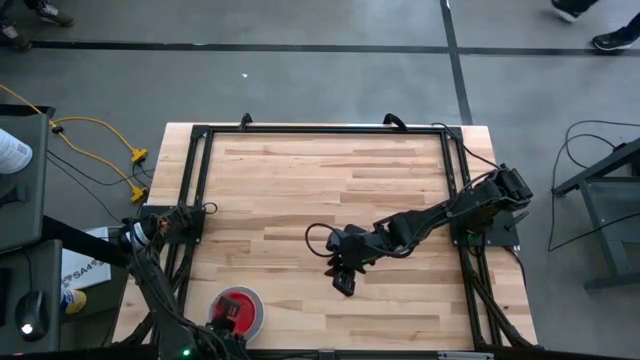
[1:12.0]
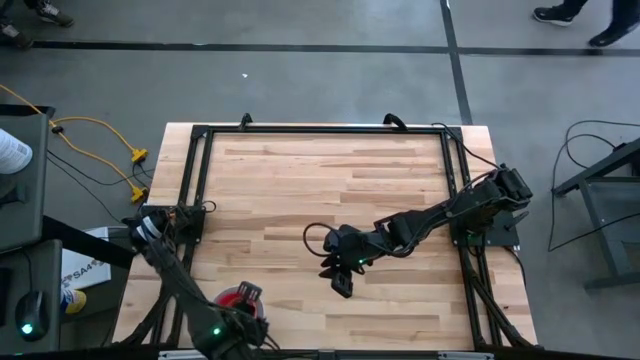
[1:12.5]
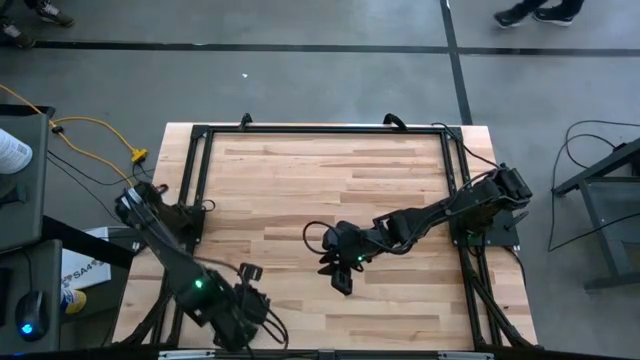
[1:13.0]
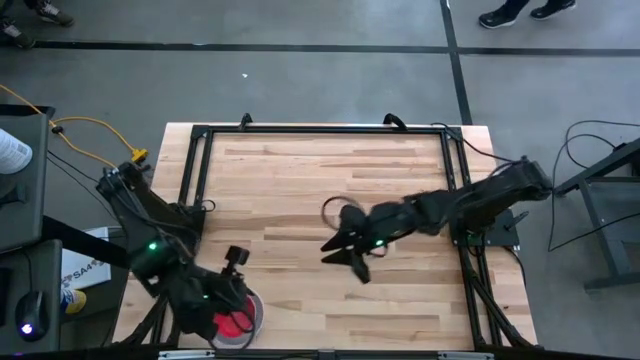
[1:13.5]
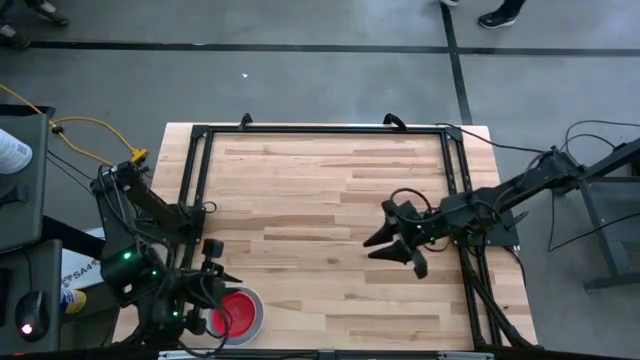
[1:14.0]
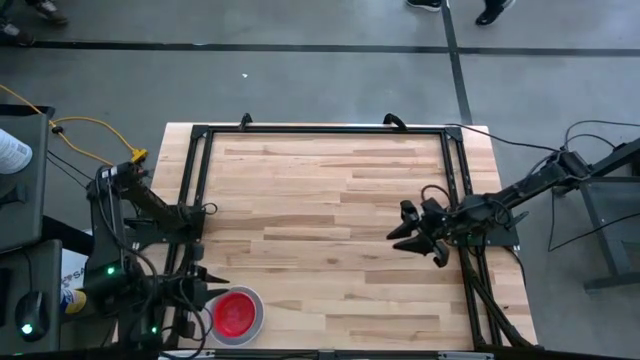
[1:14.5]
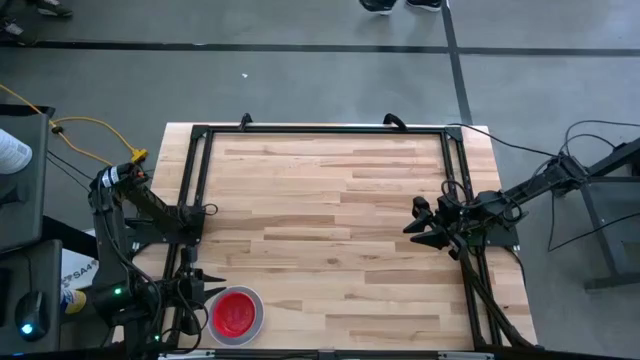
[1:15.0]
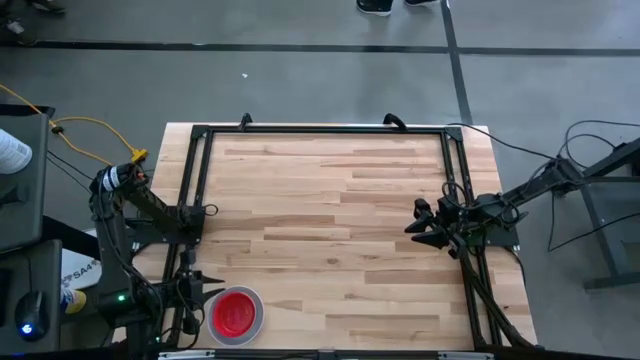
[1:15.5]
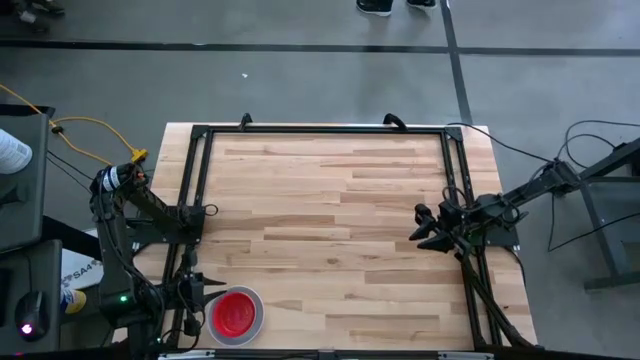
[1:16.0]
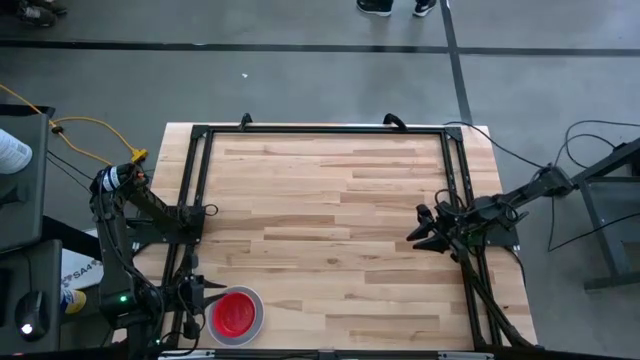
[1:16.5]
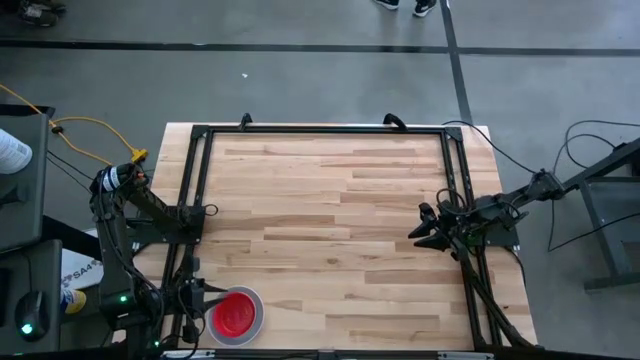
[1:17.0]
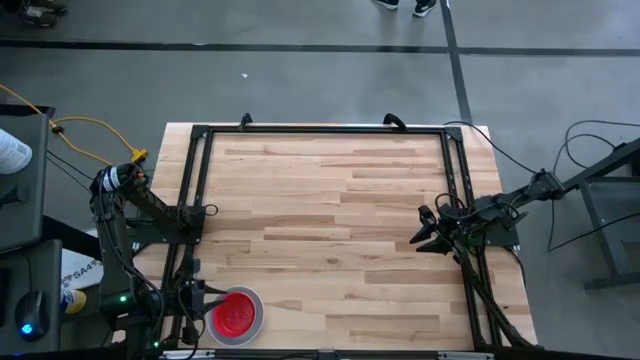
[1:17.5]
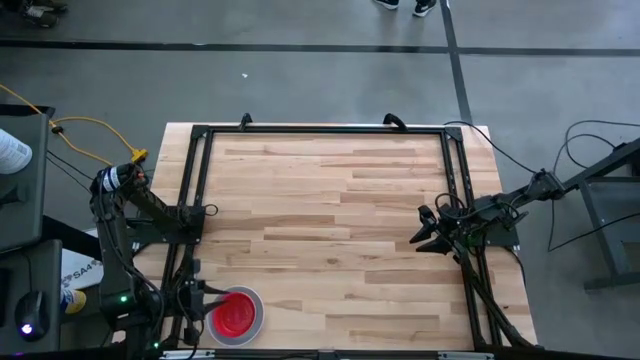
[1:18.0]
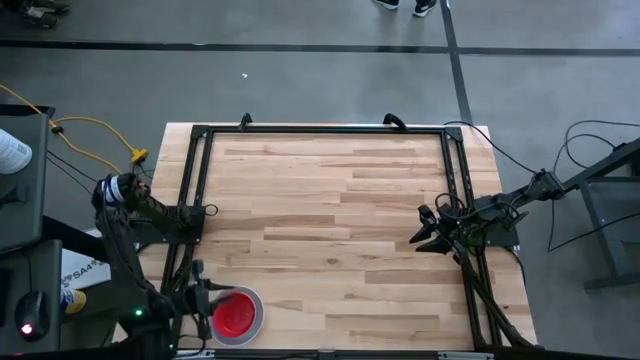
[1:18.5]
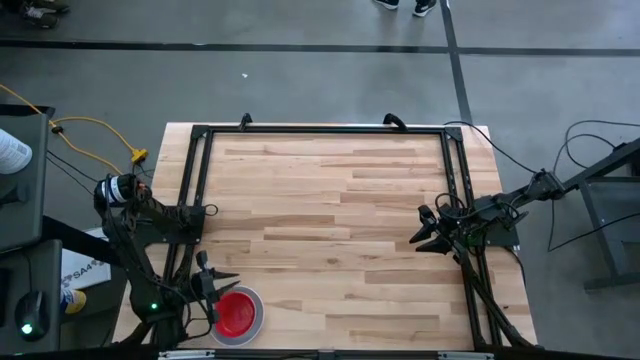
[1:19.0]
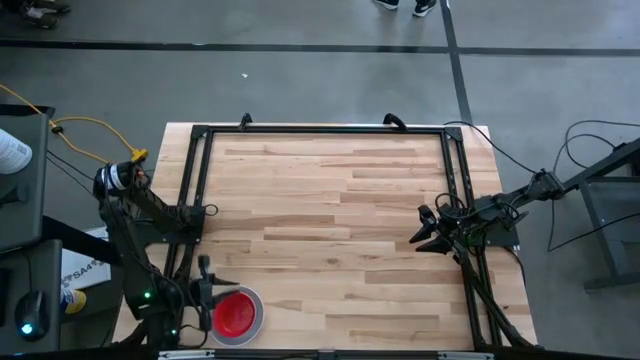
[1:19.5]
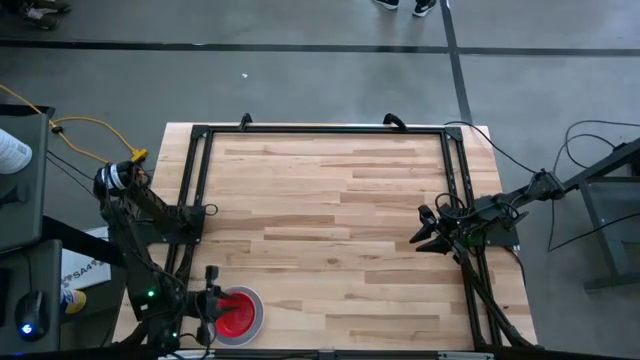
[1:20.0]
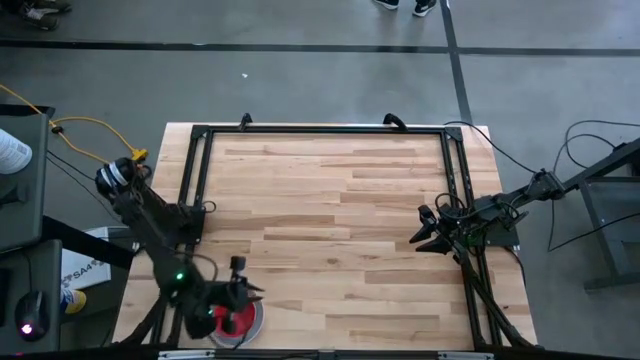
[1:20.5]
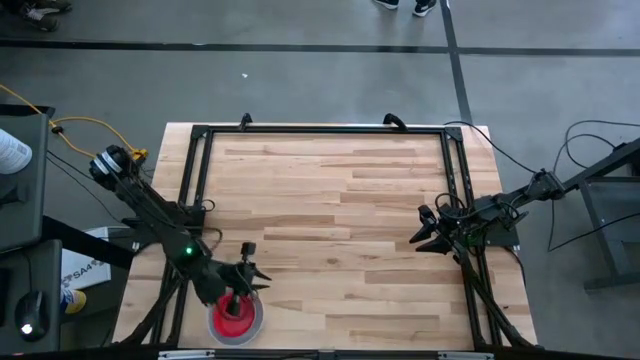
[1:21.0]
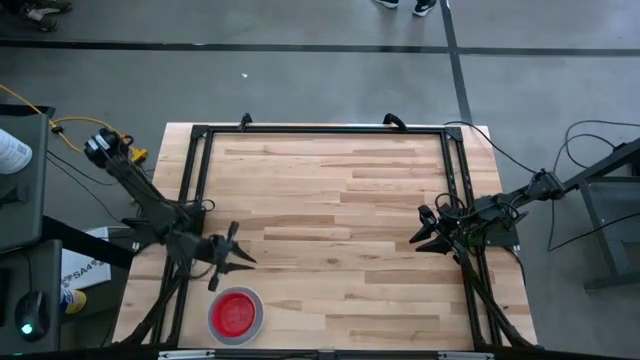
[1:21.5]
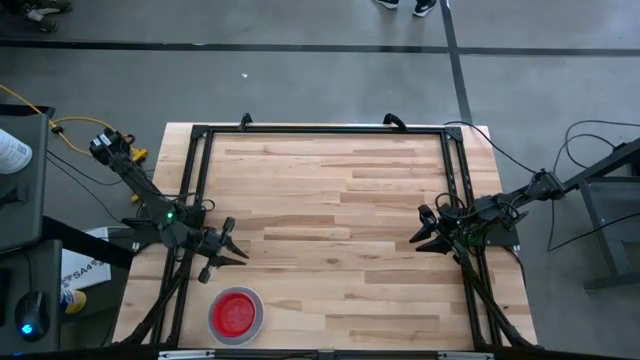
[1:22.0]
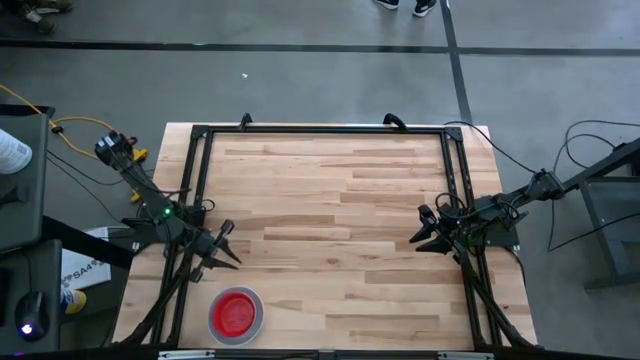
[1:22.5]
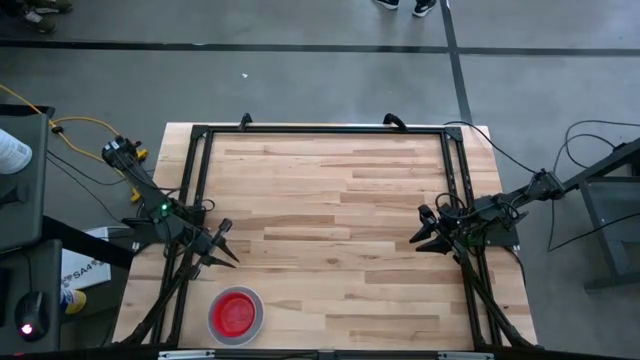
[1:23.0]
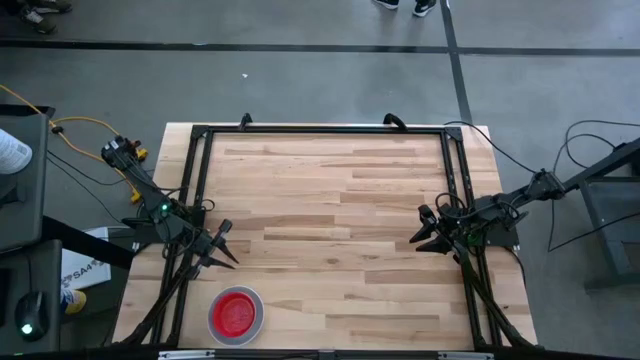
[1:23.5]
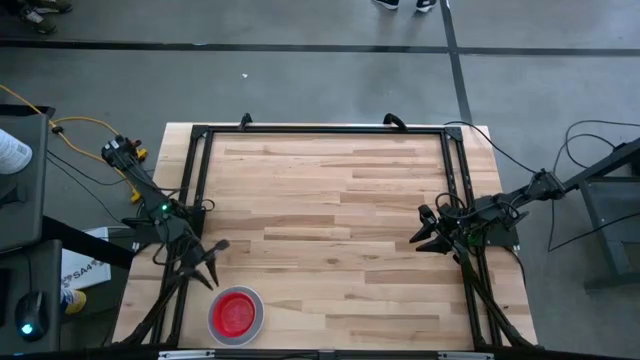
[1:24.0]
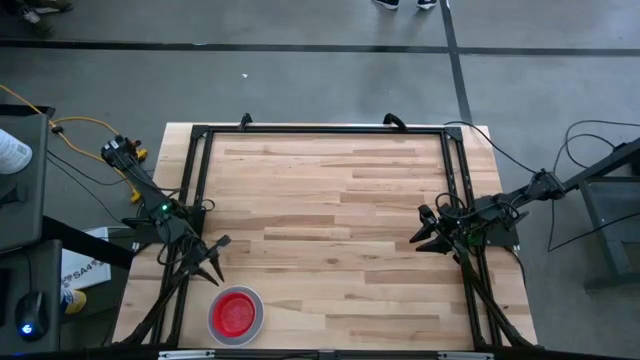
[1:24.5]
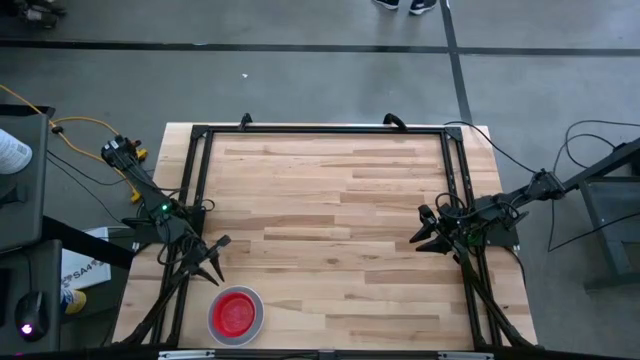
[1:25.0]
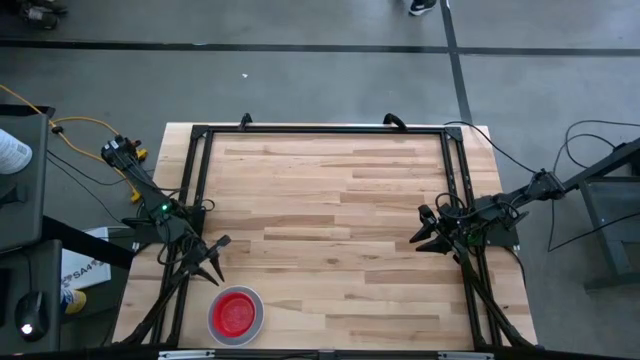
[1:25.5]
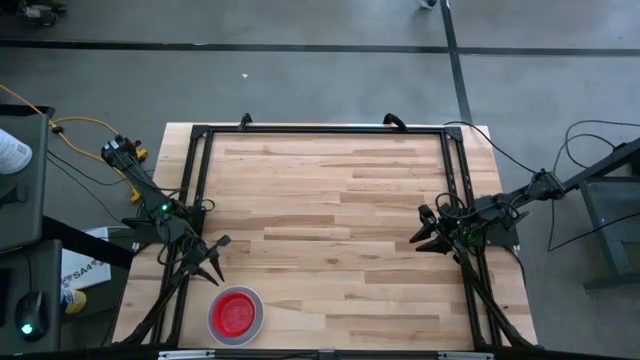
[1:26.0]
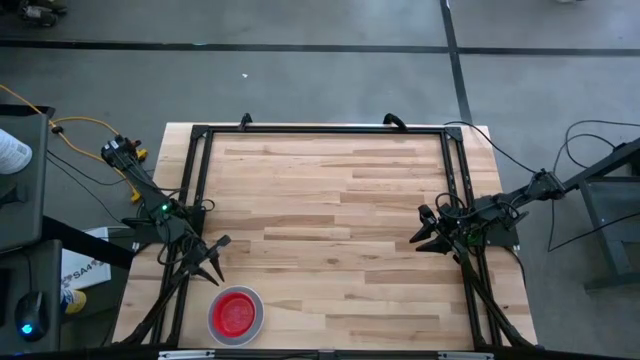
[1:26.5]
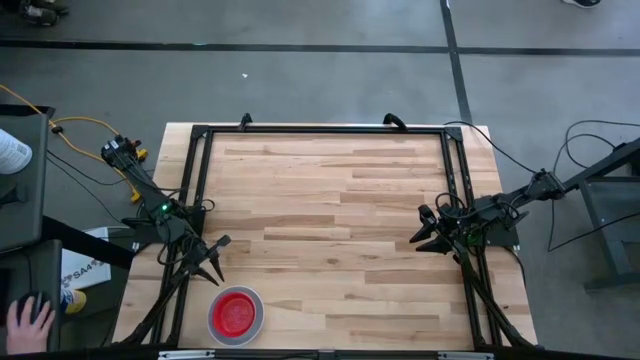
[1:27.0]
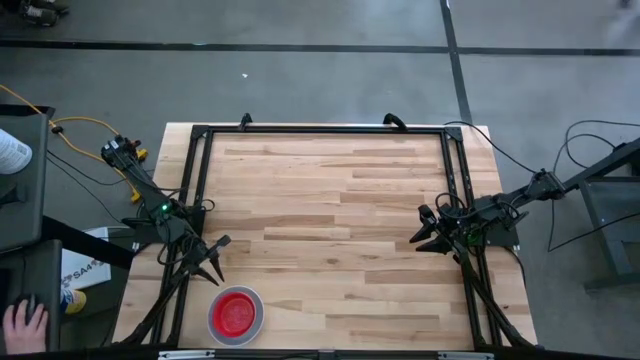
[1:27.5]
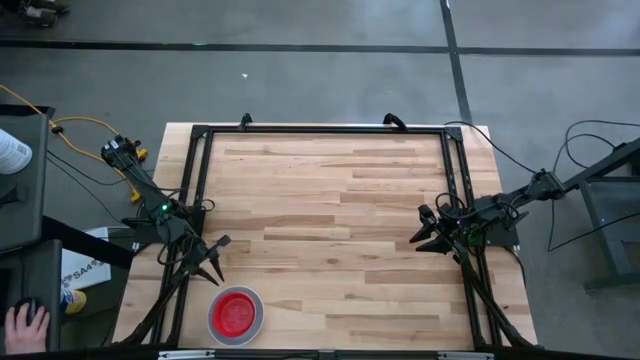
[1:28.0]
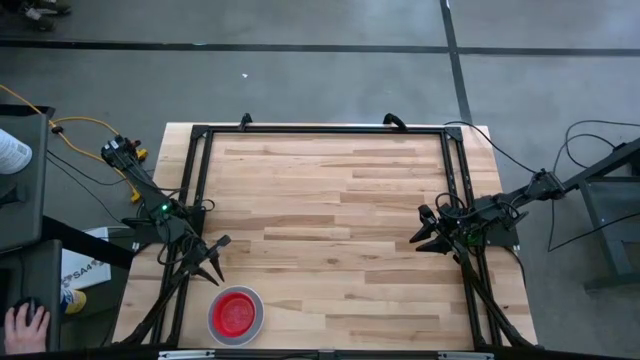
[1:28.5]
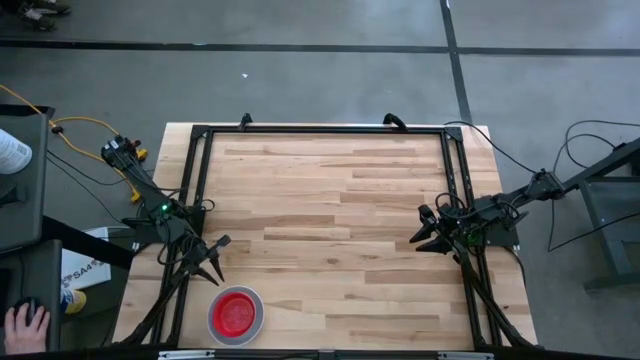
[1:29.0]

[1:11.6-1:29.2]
Return to Home Position
